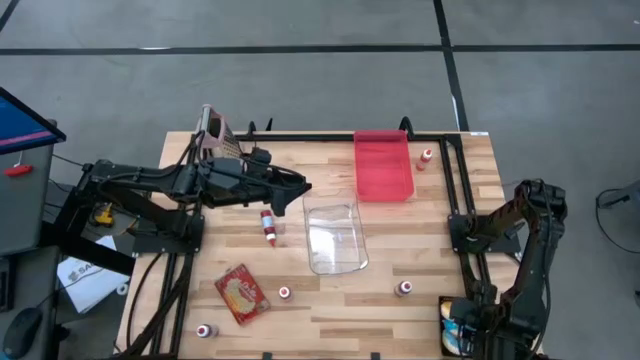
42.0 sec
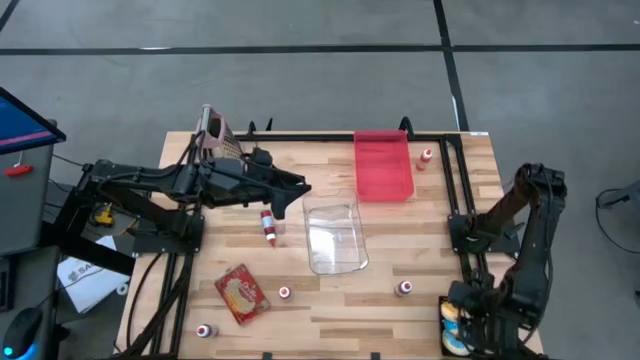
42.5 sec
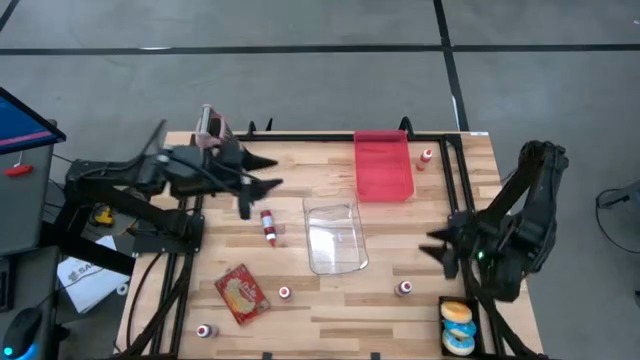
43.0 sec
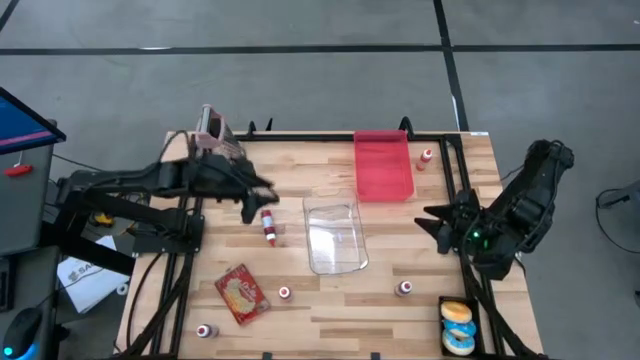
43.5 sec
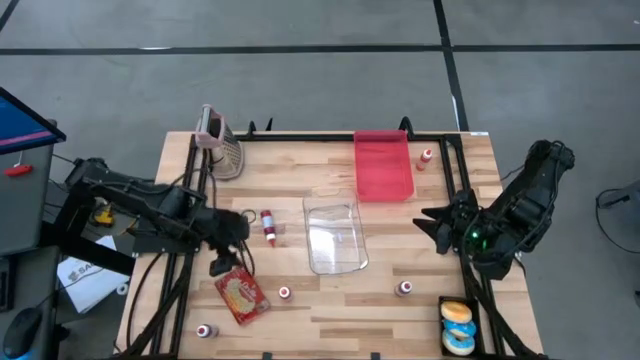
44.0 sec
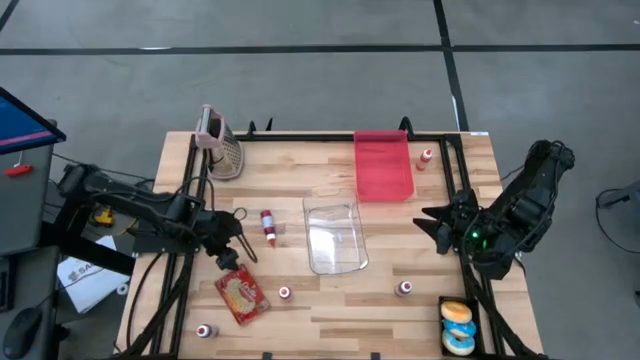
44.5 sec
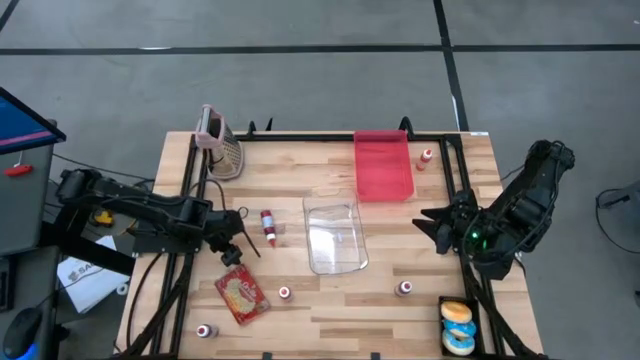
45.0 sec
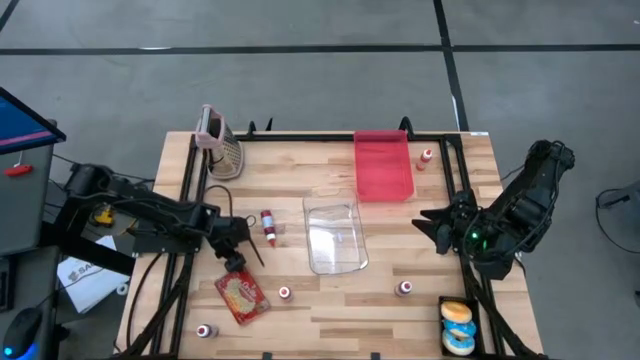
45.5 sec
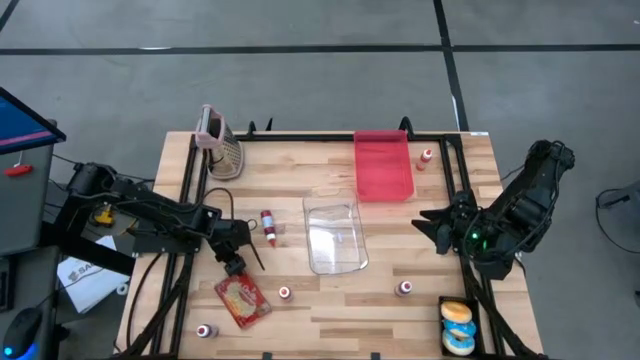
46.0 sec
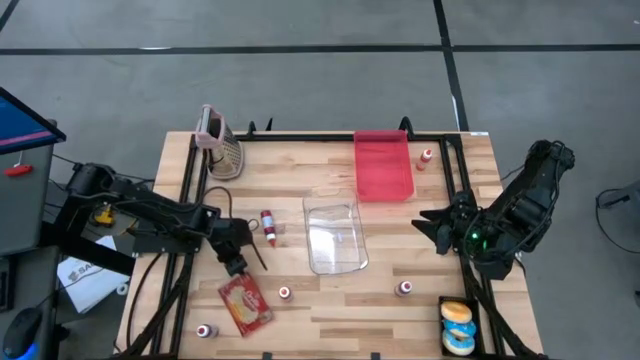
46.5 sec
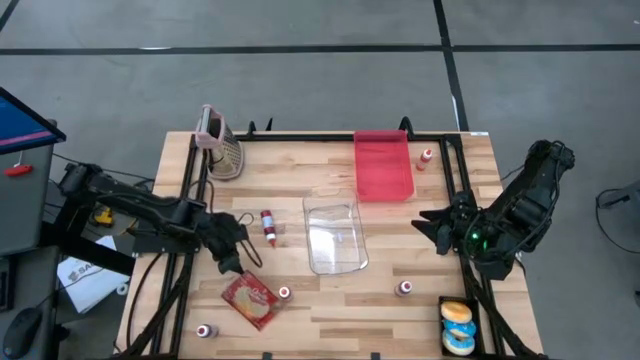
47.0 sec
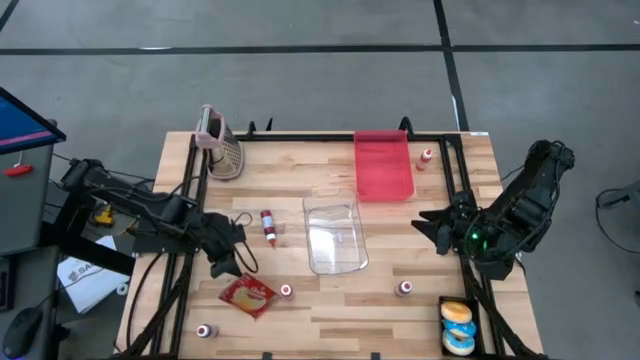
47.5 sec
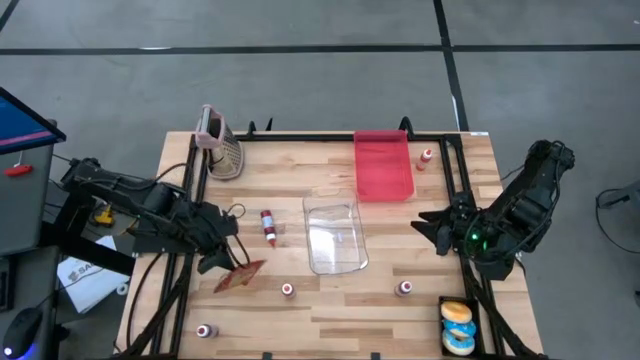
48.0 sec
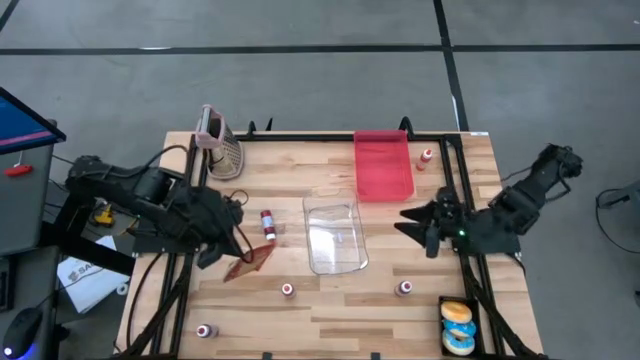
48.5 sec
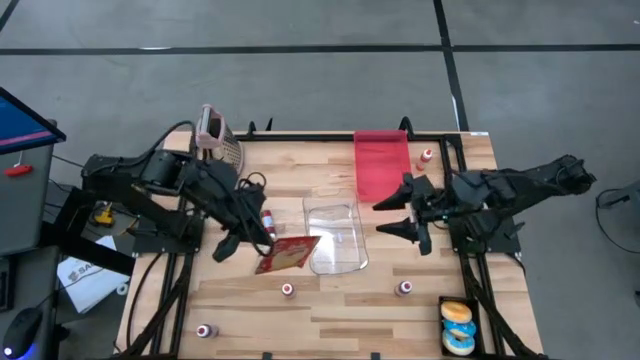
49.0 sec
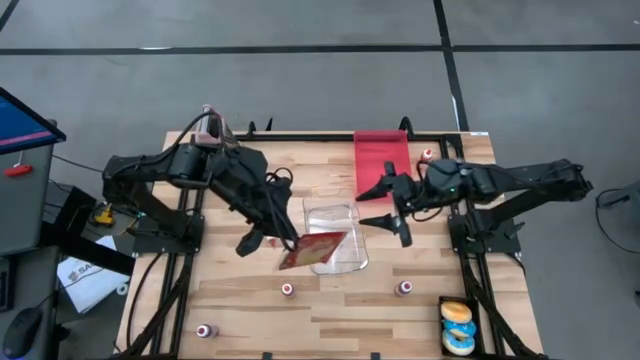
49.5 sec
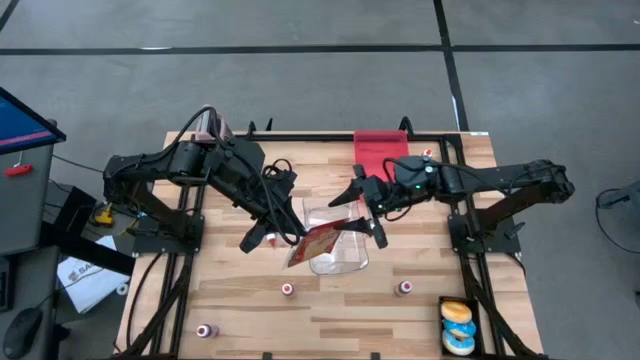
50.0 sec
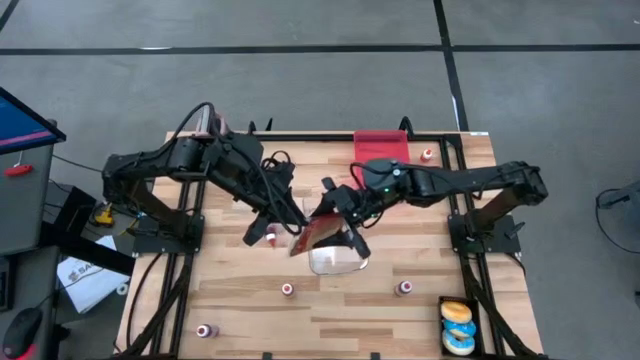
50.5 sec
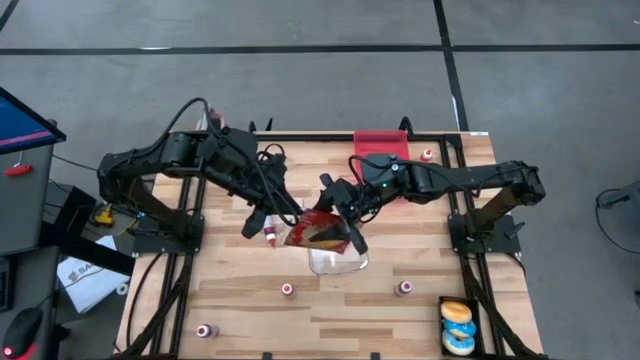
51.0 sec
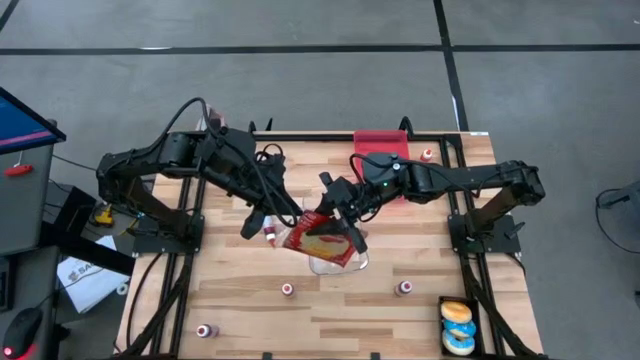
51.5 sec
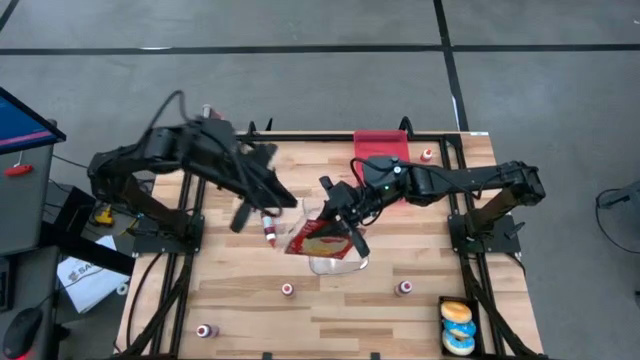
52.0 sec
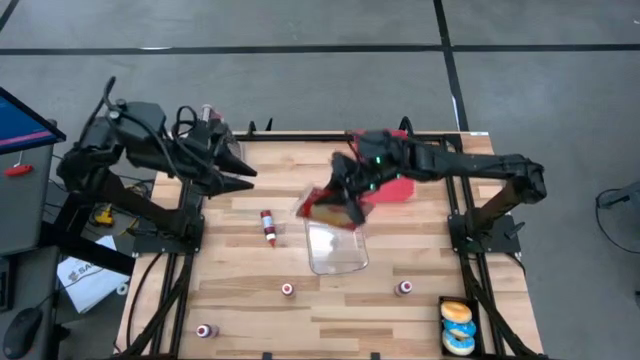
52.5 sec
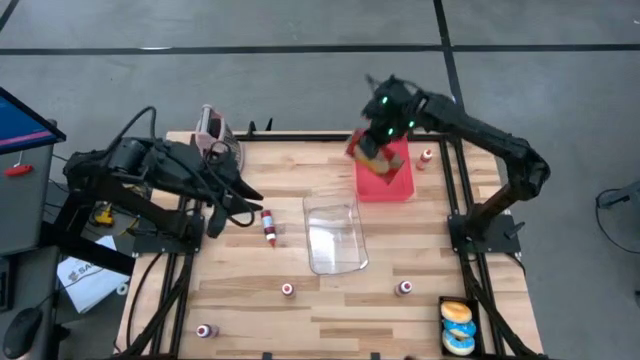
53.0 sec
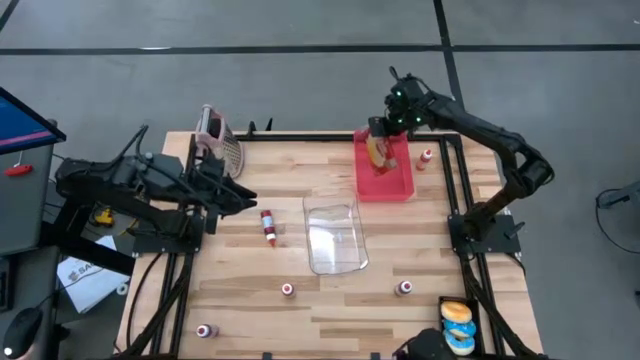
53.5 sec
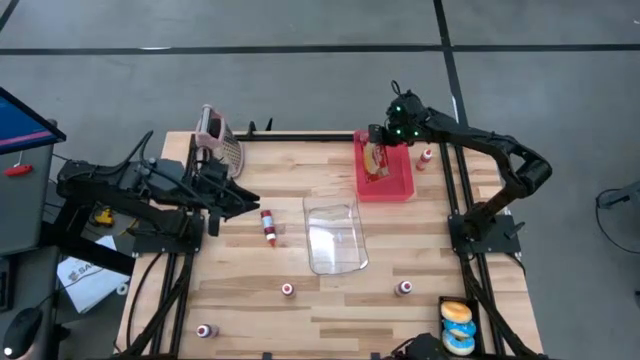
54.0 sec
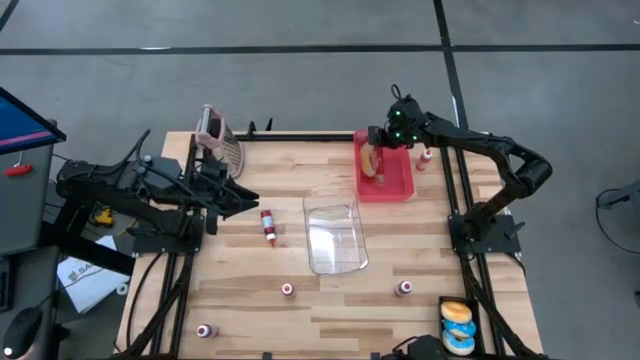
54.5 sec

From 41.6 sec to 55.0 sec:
Put the red popcorn bag into the red bin

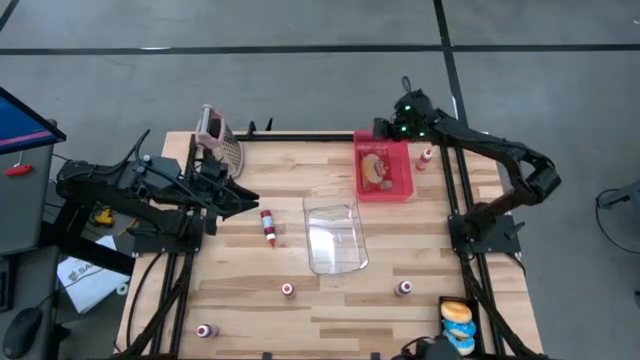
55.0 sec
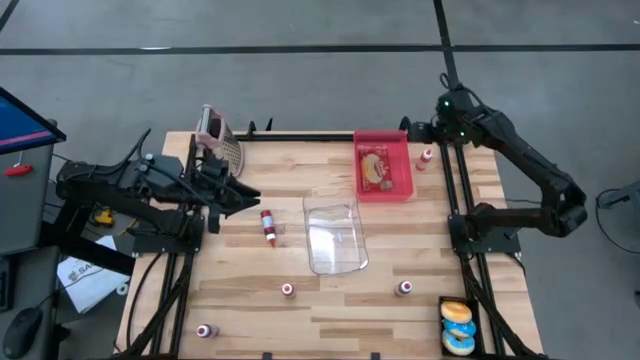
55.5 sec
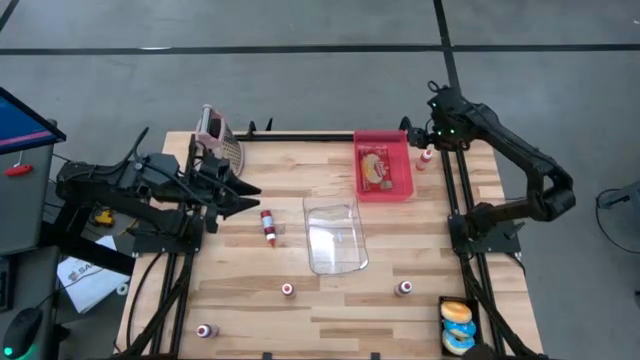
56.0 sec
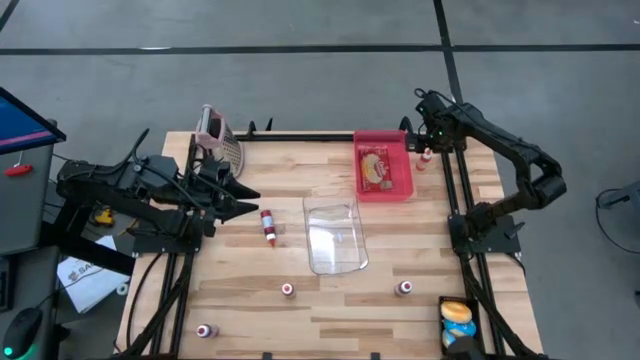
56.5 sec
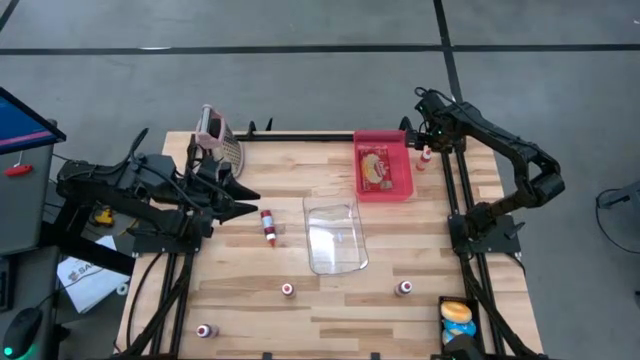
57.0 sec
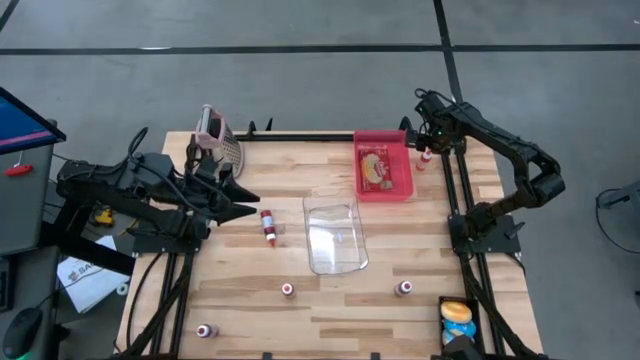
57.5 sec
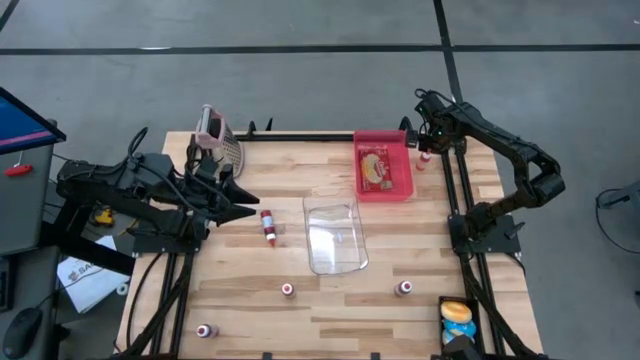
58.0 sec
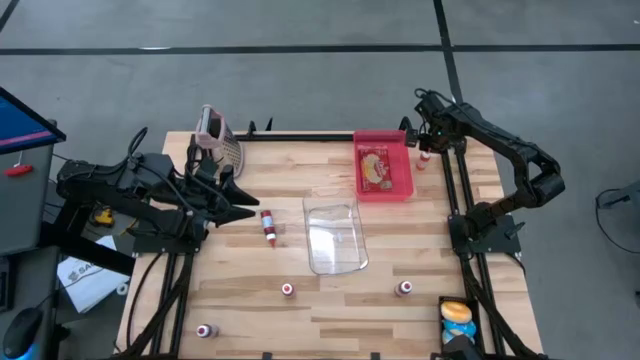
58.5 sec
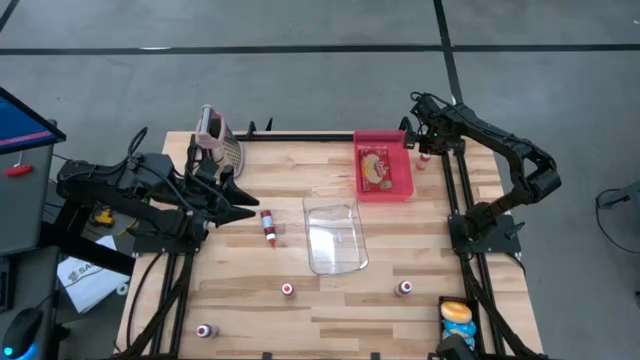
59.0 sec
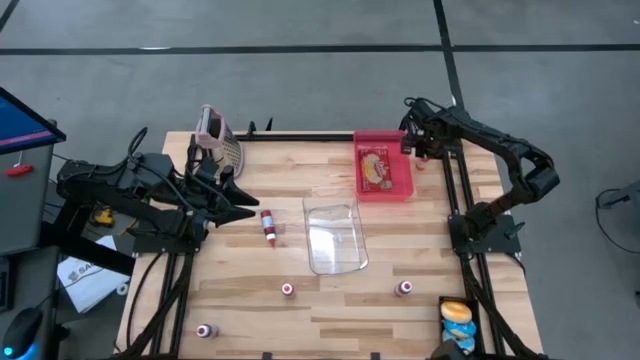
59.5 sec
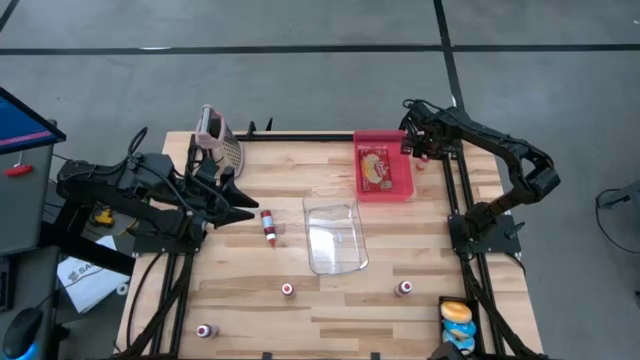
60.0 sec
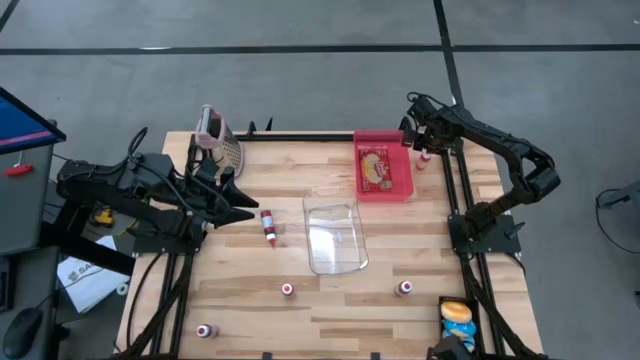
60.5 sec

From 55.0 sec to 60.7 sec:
Put the right orange food coloring bottle into the transparent bin

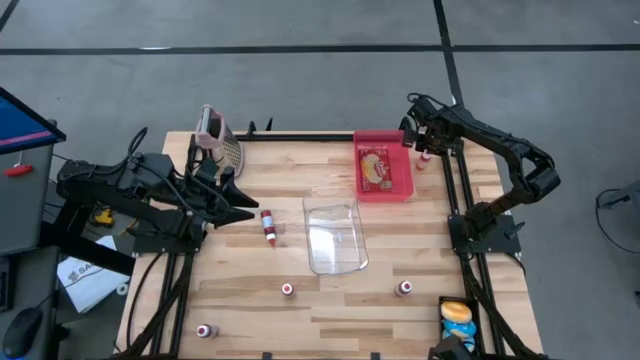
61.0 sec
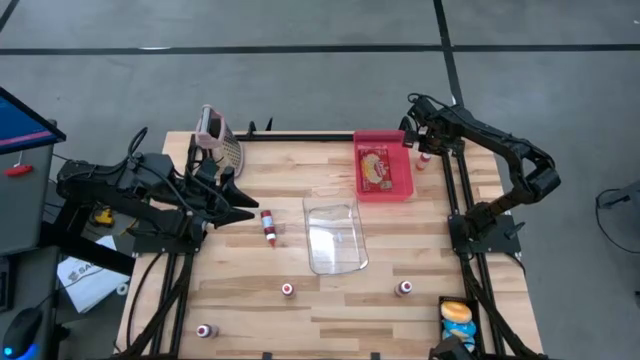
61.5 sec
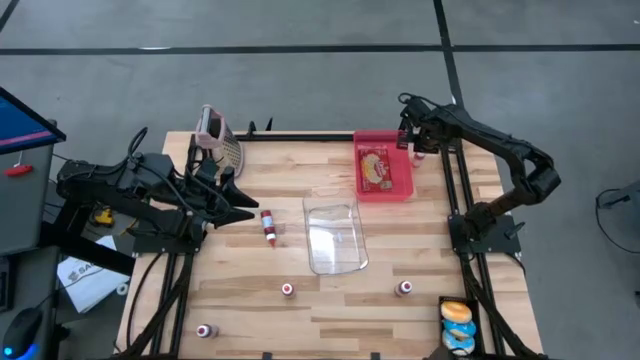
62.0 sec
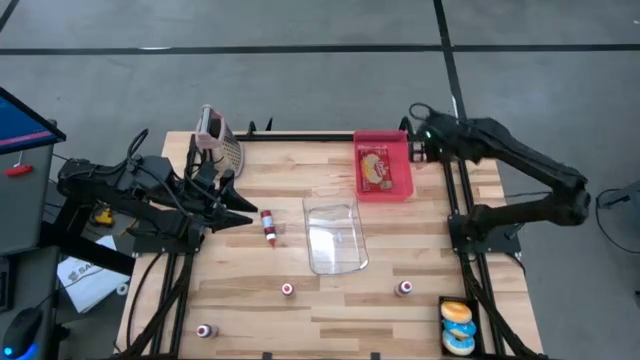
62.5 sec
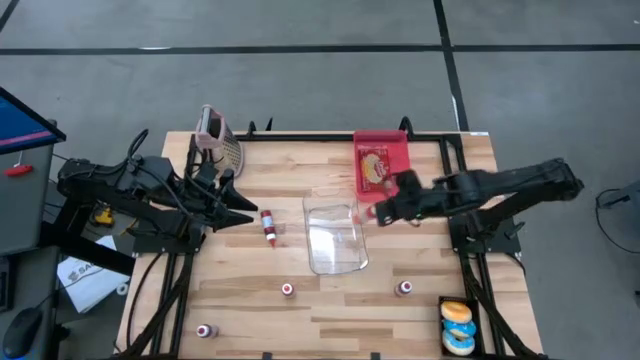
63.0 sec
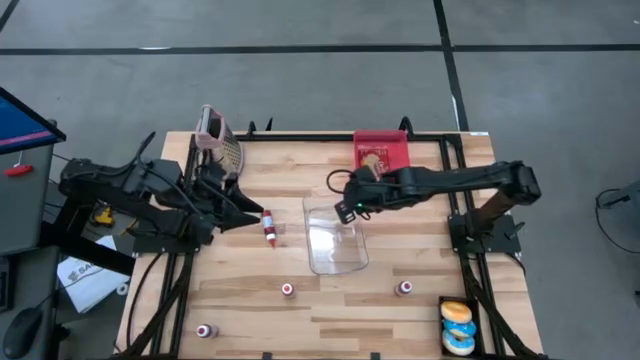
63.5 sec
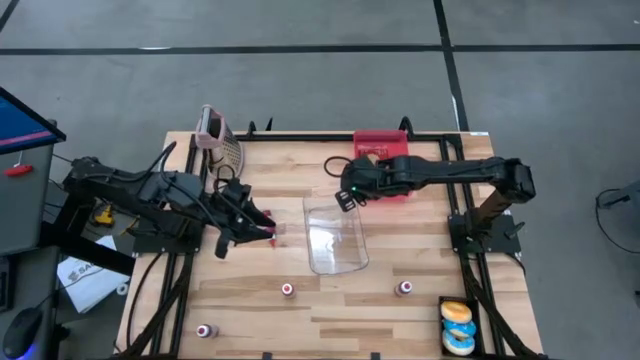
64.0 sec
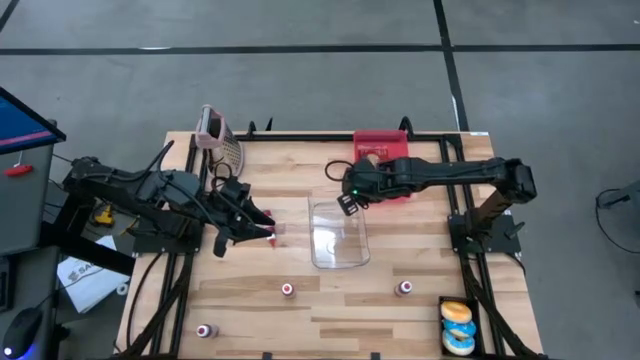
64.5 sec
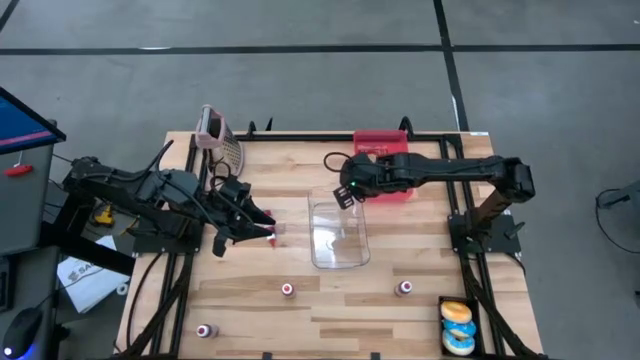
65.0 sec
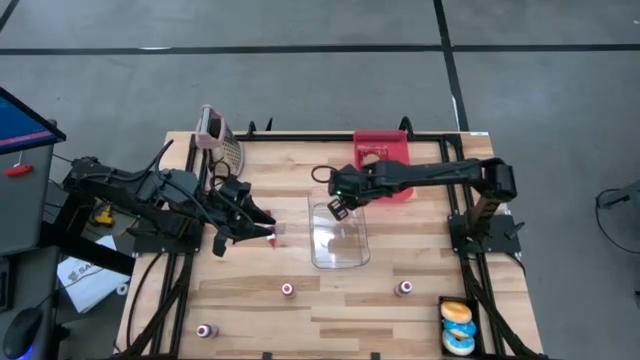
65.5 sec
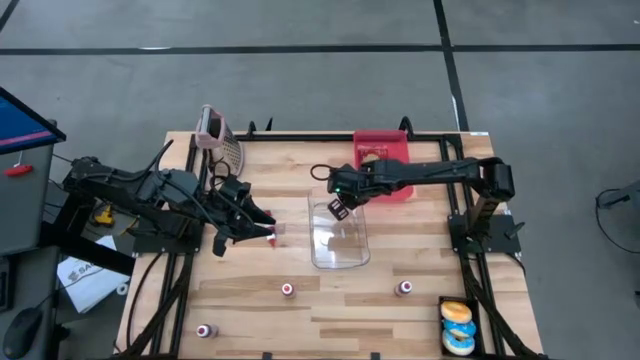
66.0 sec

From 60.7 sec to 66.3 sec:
Put the right orange food coloring bottle into the transparent bin
